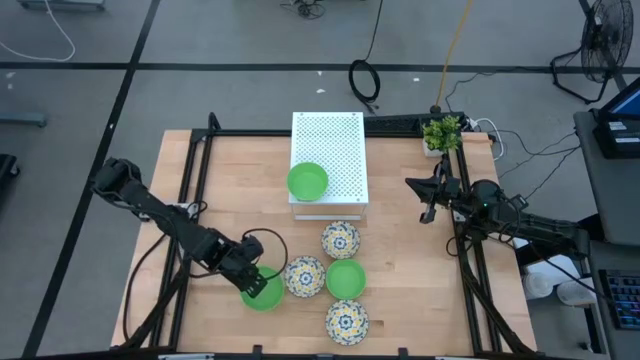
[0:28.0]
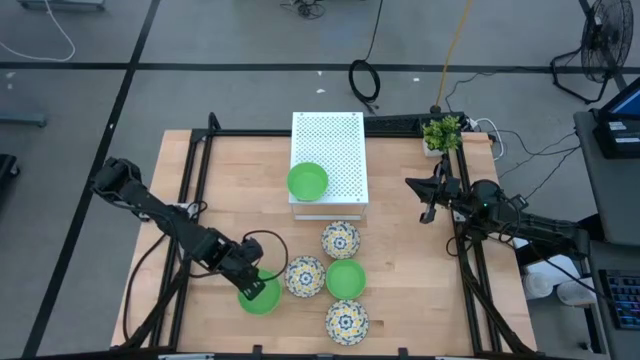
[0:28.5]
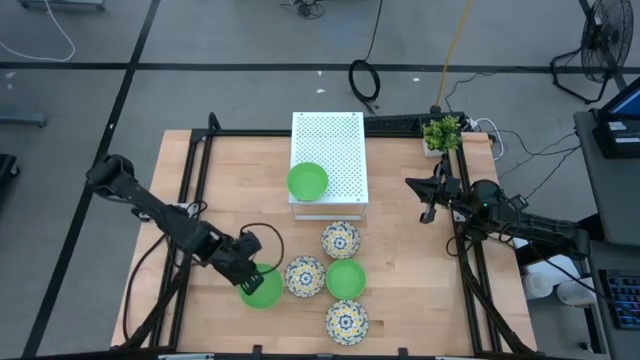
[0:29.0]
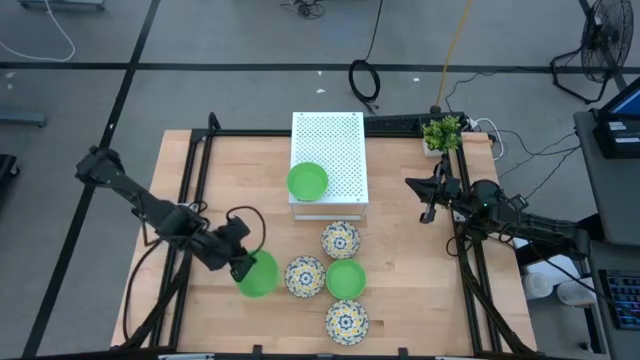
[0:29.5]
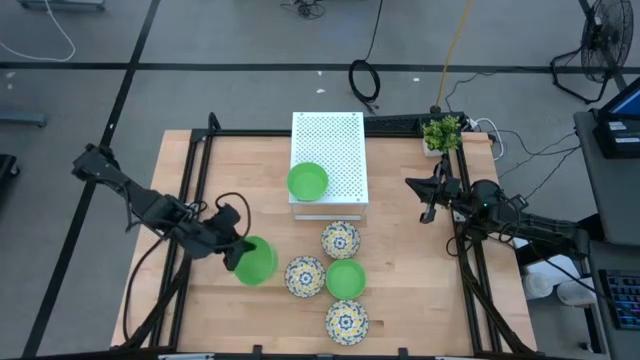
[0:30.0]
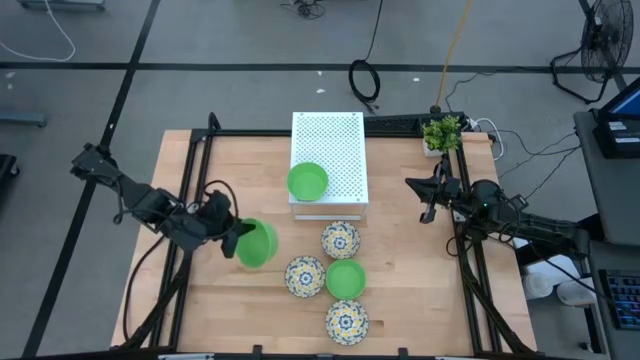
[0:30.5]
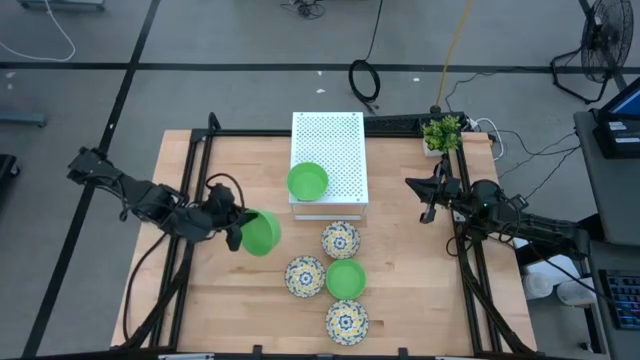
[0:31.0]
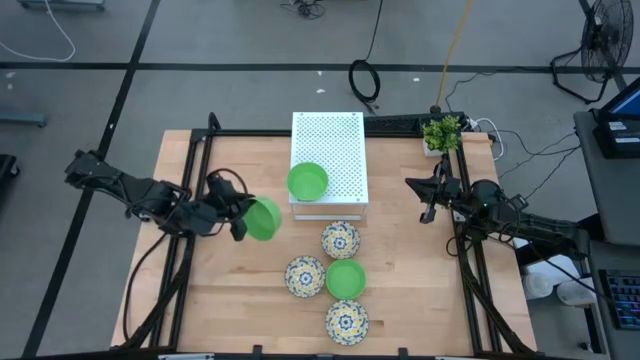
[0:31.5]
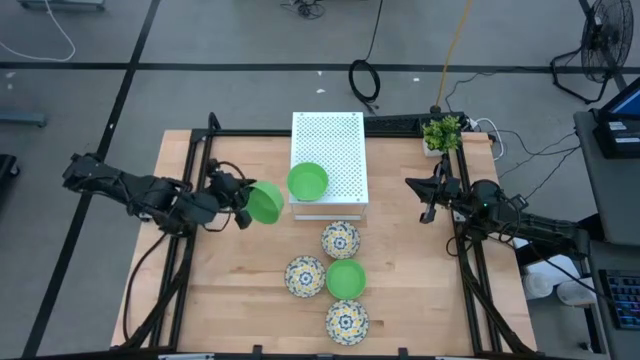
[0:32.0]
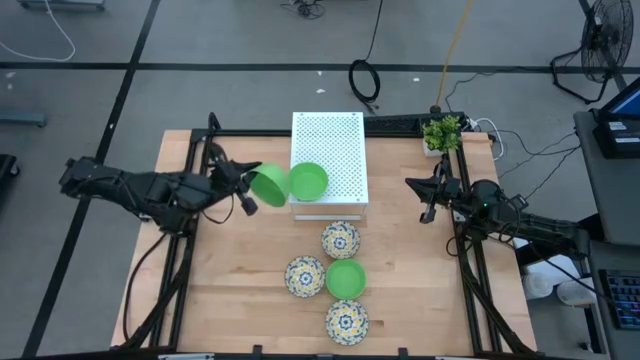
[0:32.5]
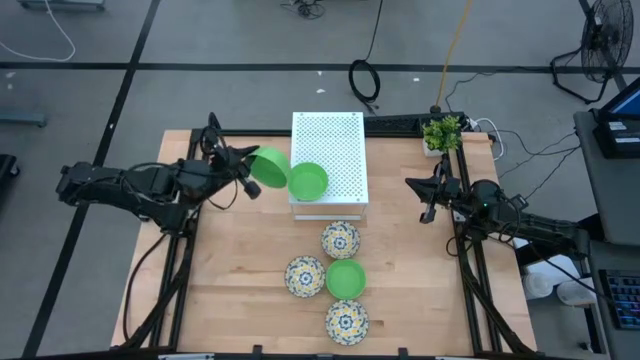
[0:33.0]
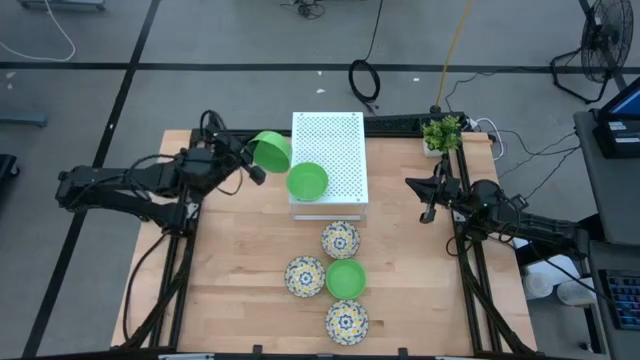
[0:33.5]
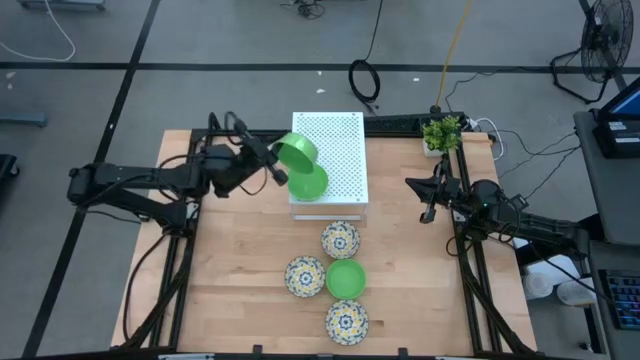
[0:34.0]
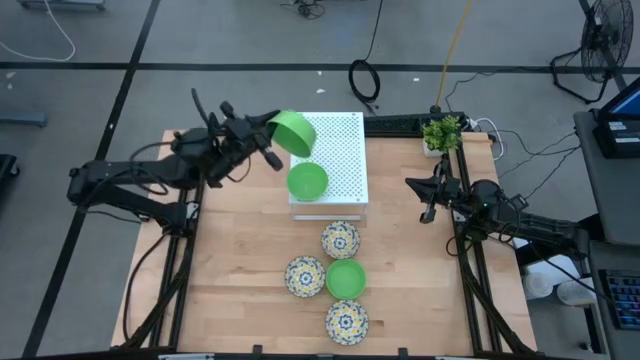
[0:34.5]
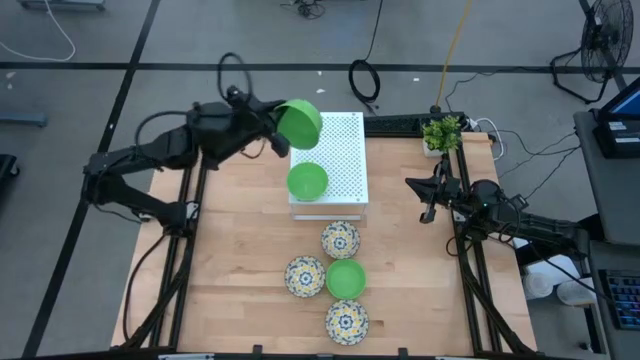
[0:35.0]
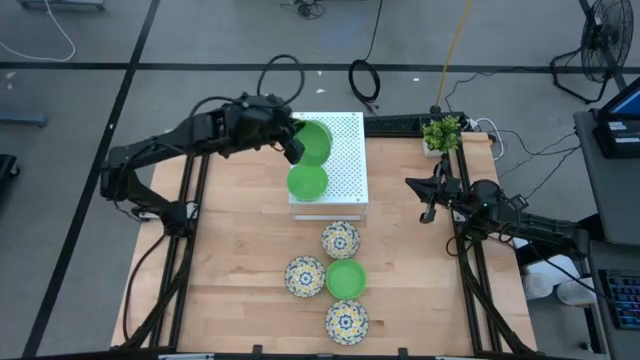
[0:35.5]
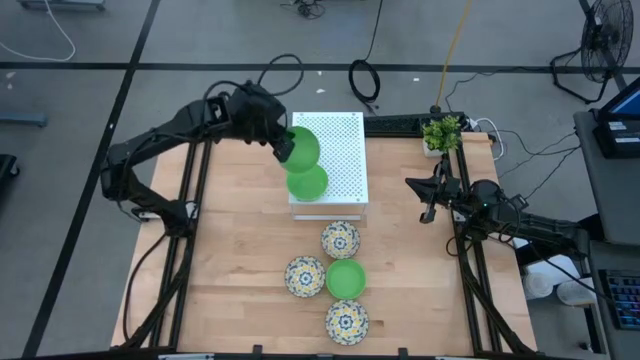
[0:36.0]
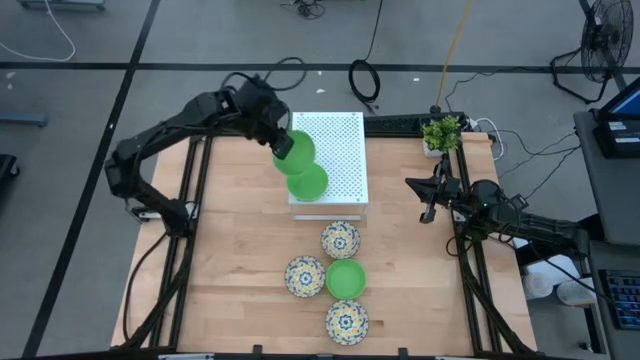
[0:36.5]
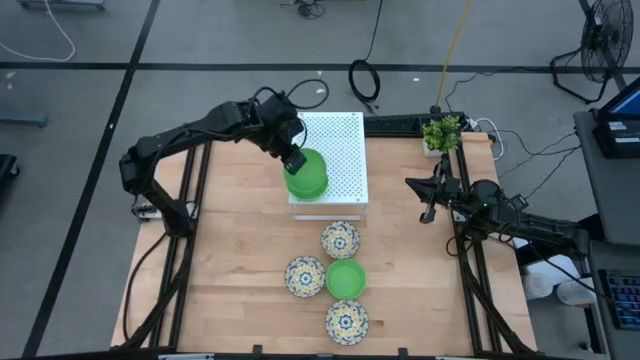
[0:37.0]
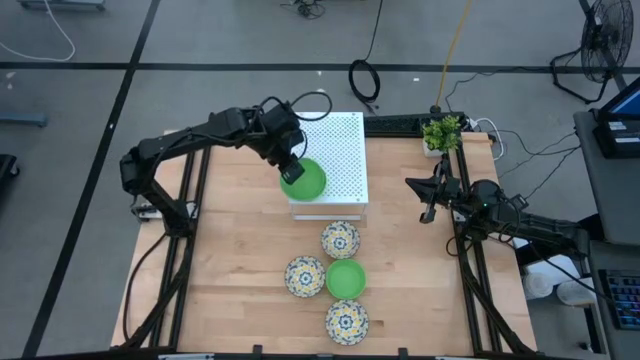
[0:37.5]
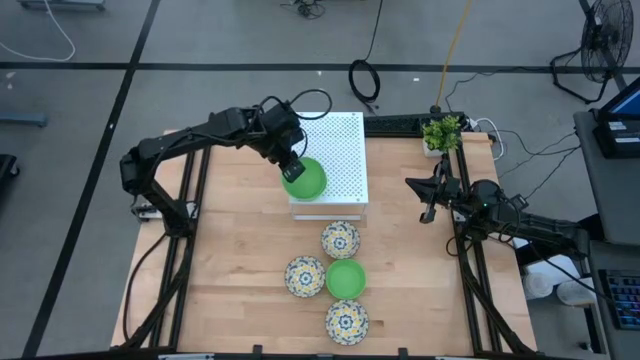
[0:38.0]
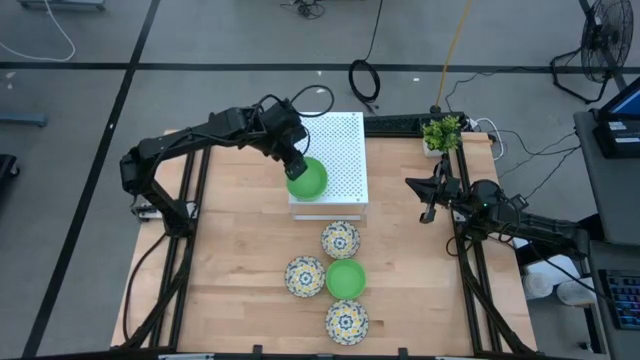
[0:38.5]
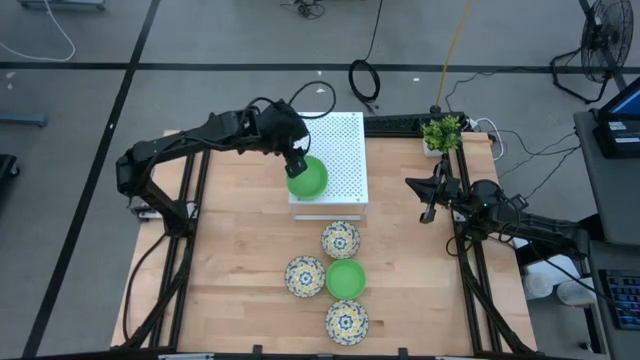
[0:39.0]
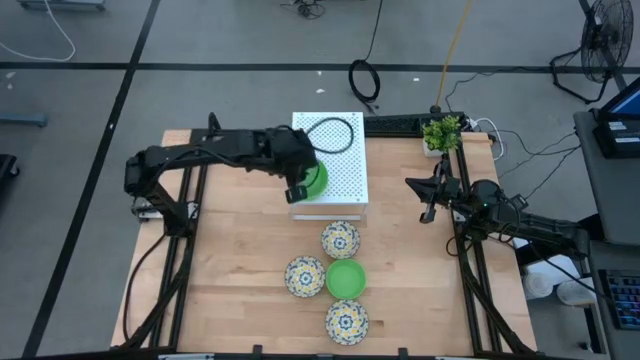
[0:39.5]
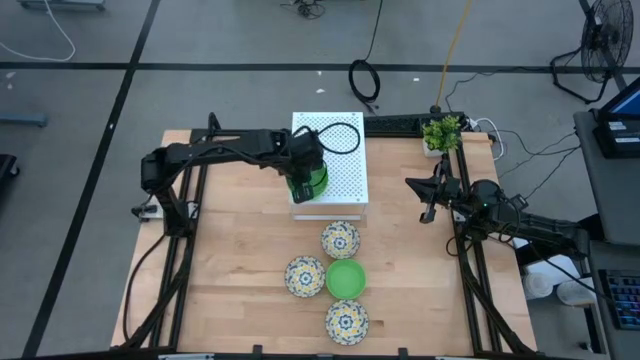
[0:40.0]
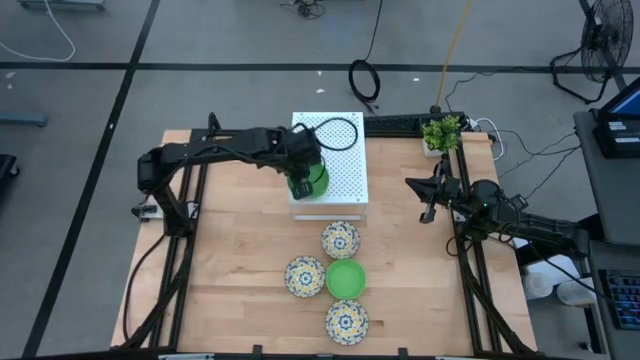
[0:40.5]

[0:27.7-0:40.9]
Task: Pick & Place Mini bowls
Stack the bottom green bowl on the shelf

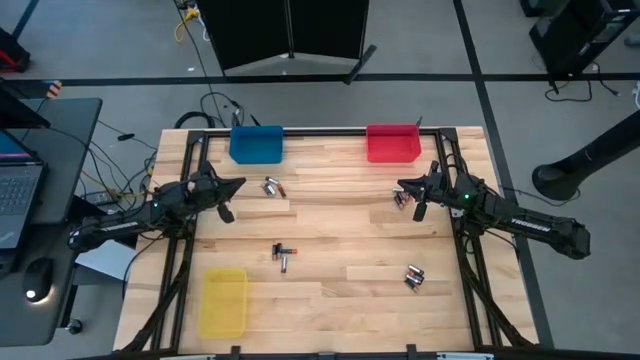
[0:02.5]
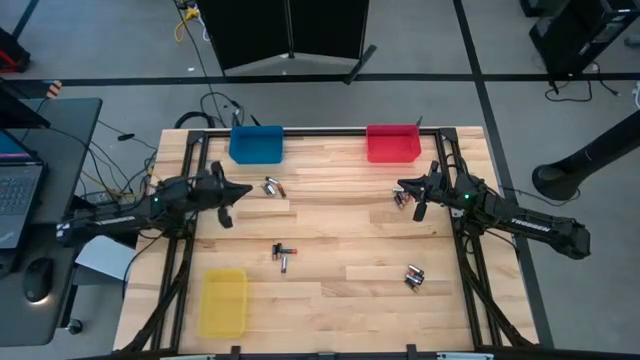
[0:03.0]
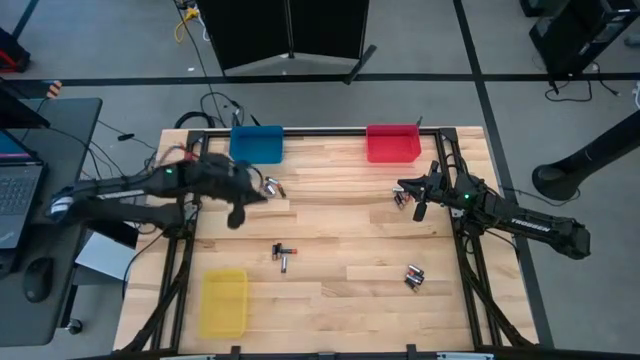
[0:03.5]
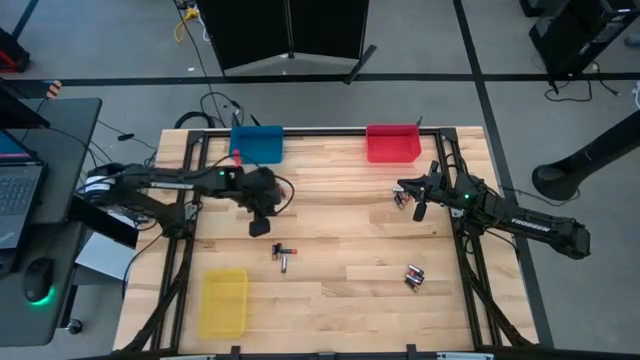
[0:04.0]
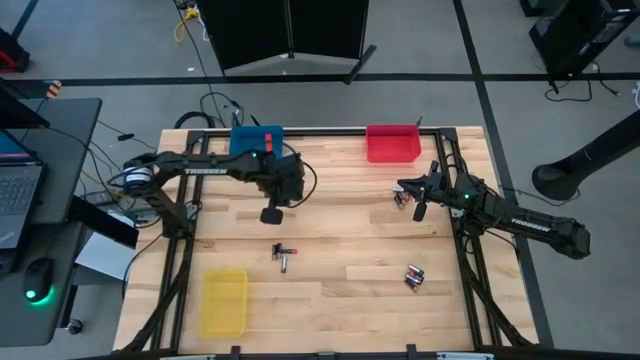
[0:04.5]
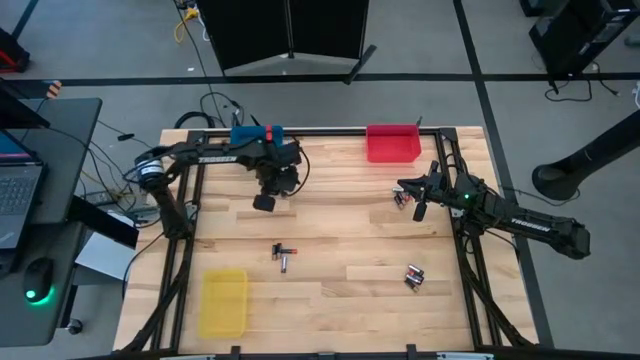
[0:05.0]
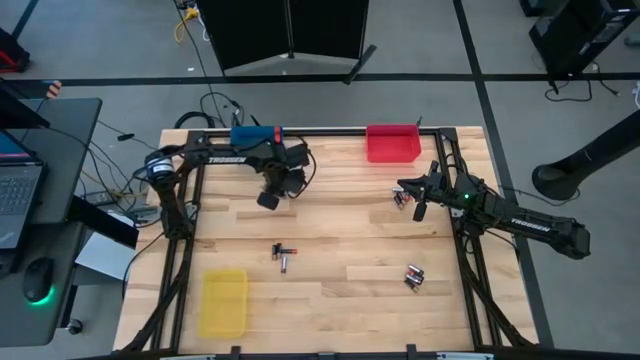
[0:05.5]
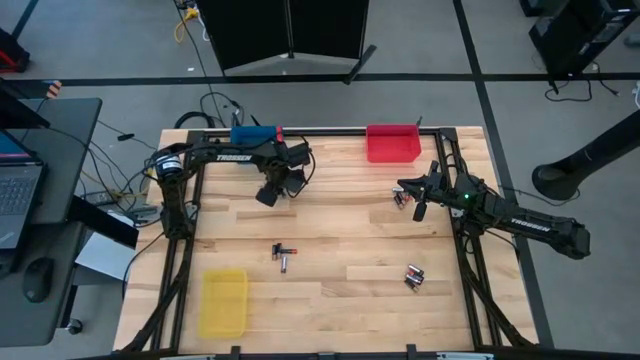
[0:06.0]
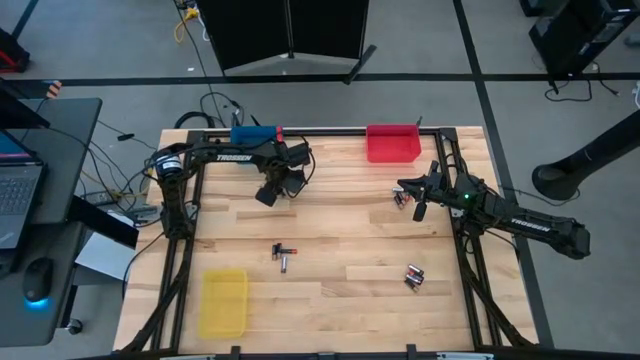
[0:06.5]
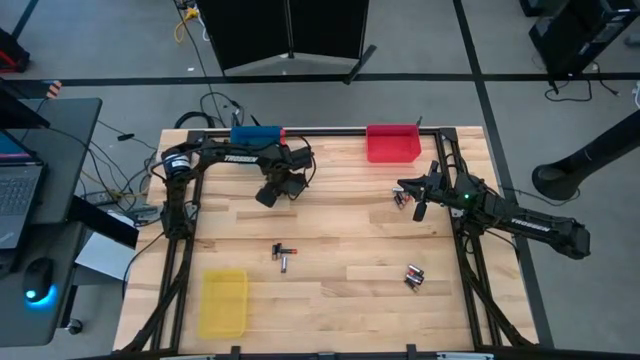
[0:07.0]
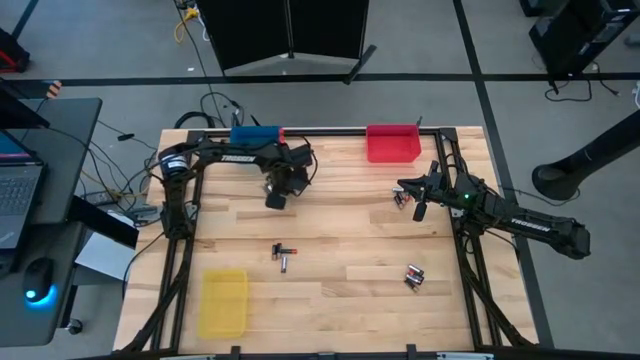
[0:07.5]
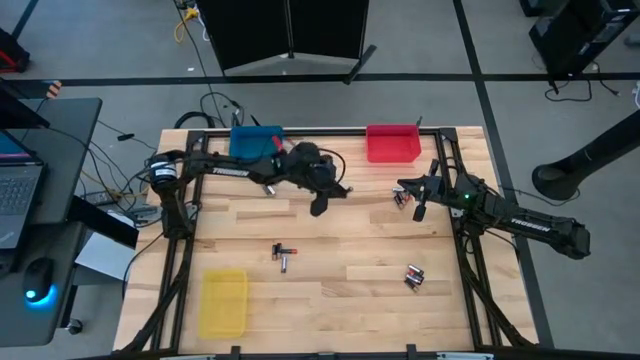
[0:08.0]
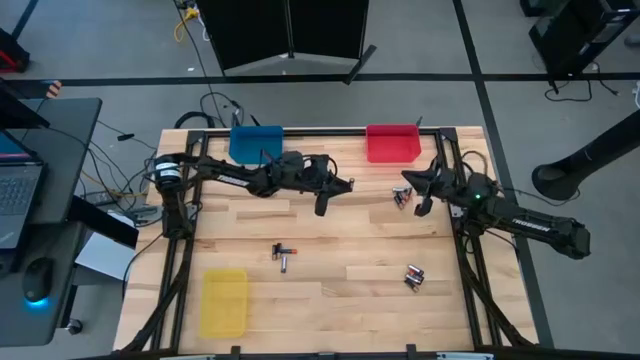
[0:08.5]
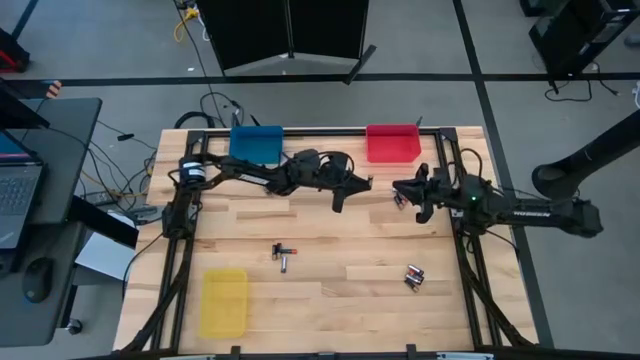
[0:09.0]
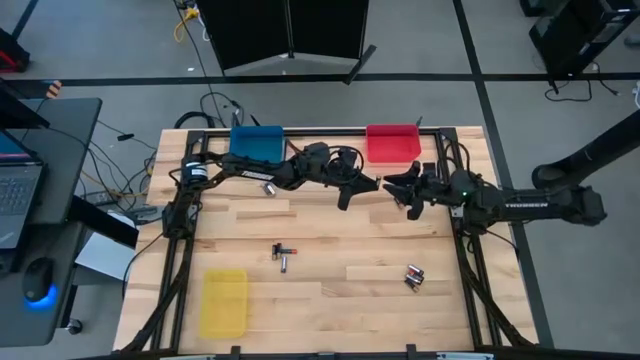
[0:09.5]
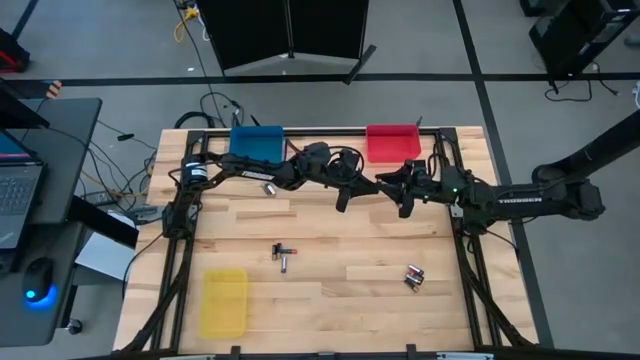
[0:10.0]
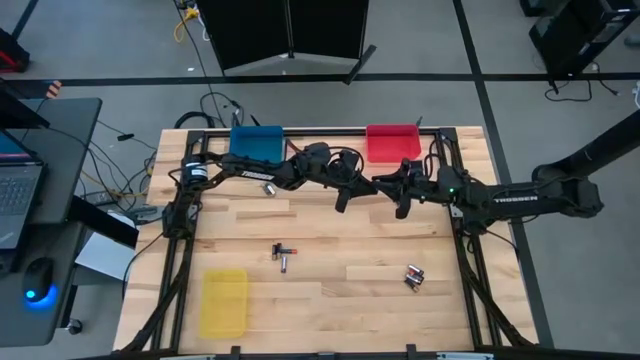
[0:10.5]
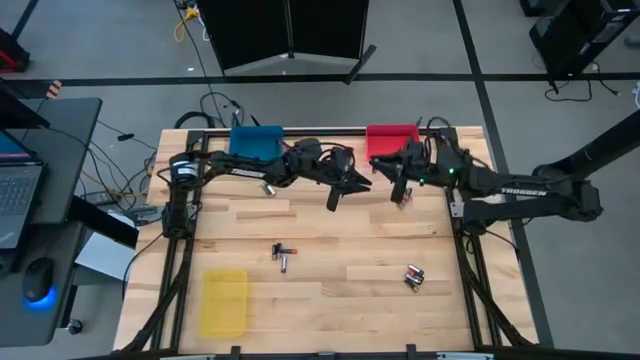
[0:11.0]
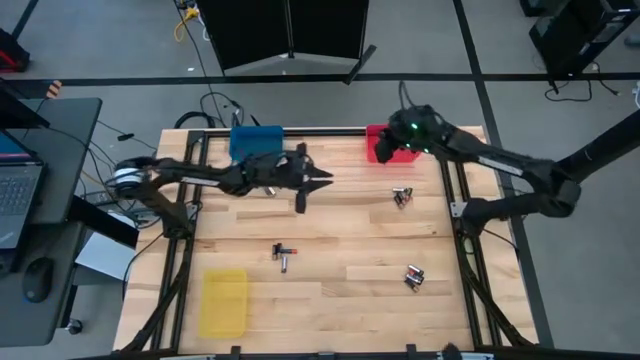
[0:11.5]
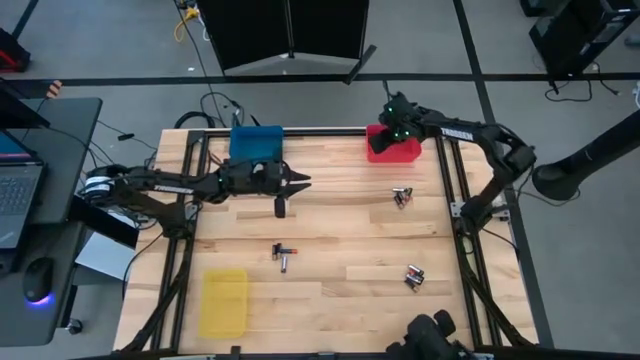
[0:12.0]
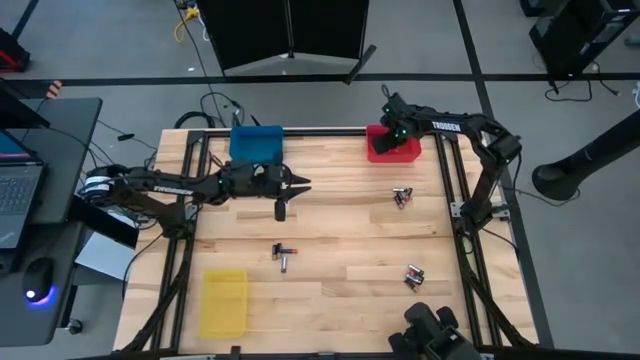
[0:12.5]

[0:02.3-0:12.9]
Task: Sort batteries
Put the black-red battery into the red bin
